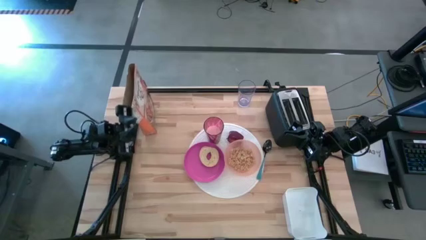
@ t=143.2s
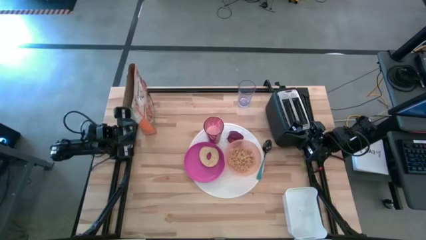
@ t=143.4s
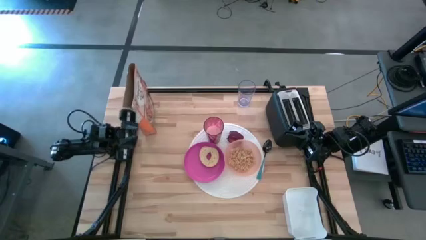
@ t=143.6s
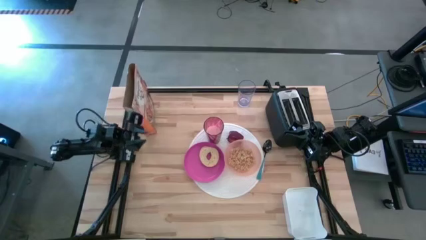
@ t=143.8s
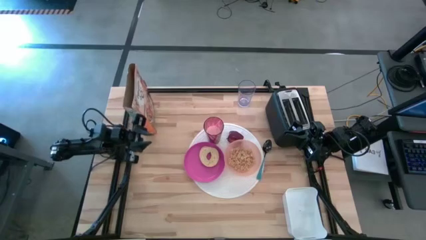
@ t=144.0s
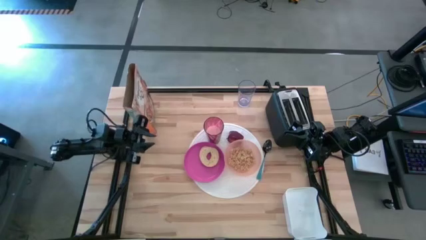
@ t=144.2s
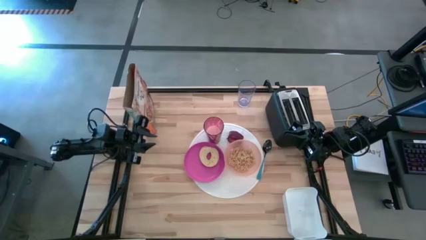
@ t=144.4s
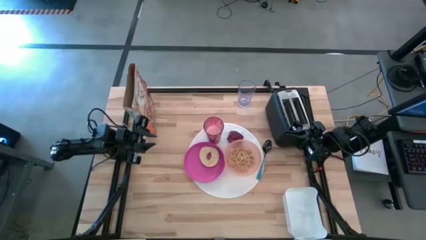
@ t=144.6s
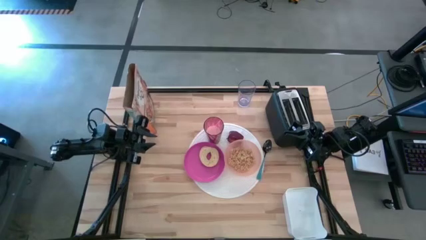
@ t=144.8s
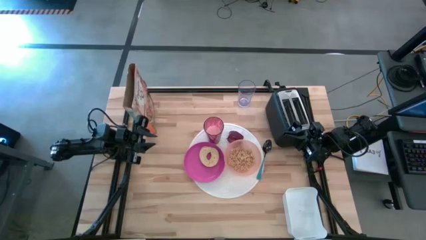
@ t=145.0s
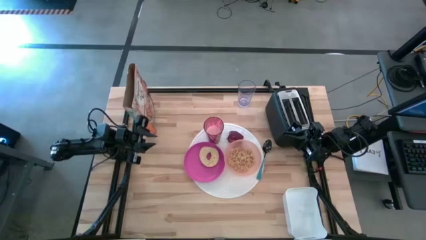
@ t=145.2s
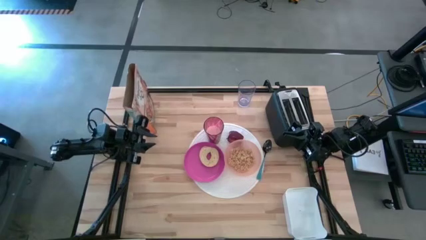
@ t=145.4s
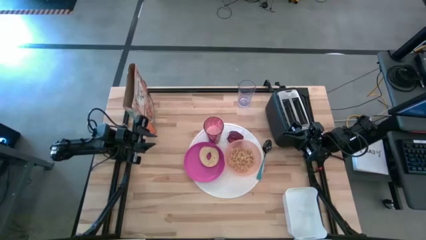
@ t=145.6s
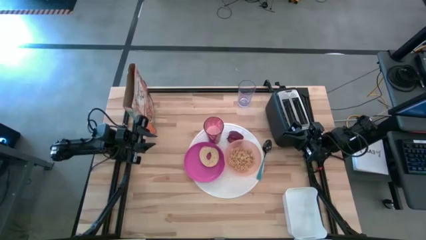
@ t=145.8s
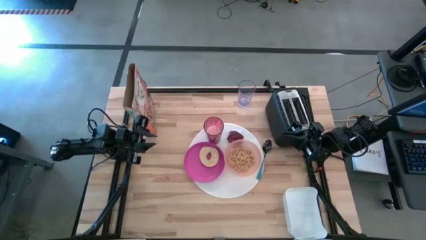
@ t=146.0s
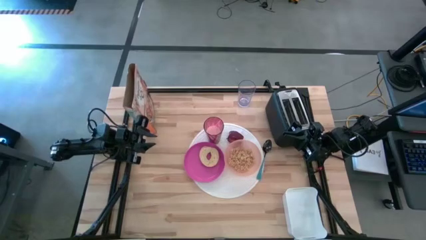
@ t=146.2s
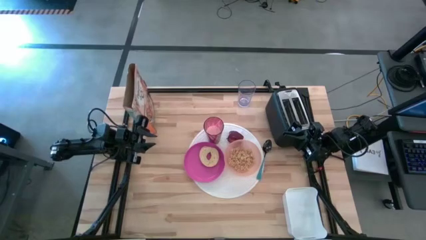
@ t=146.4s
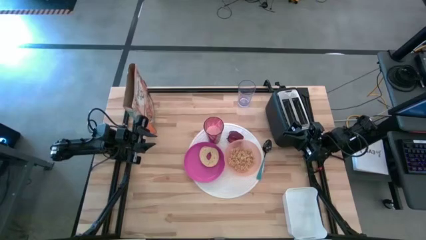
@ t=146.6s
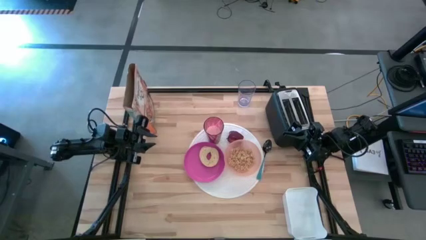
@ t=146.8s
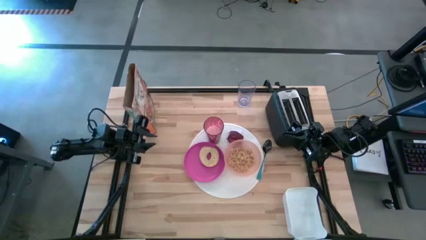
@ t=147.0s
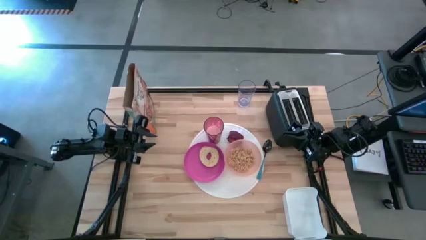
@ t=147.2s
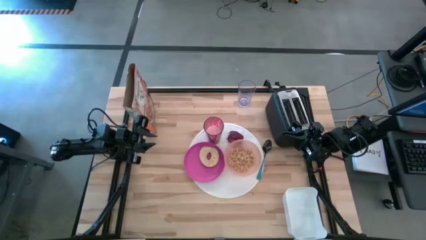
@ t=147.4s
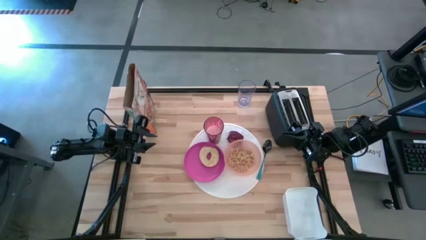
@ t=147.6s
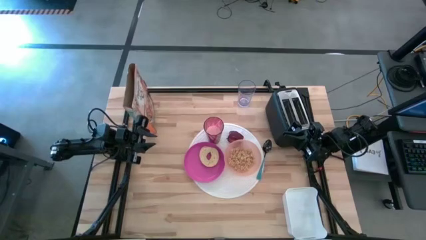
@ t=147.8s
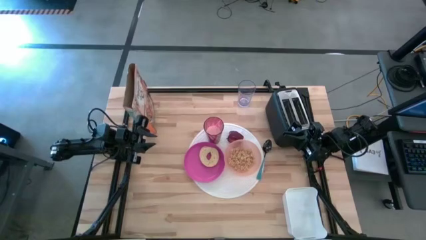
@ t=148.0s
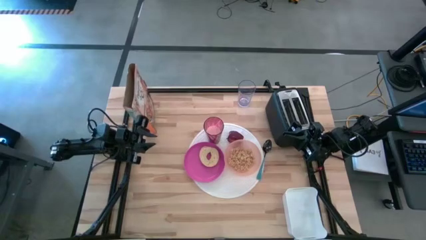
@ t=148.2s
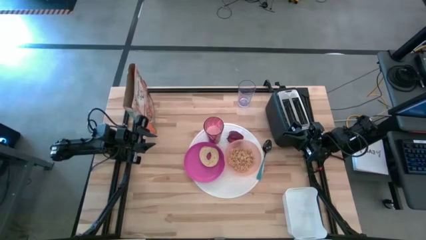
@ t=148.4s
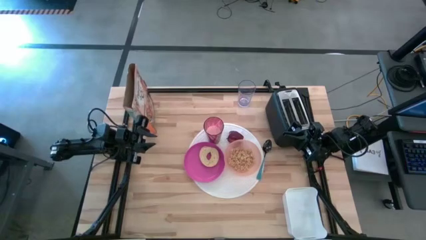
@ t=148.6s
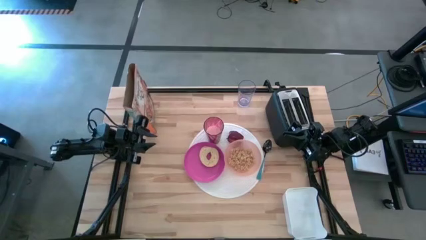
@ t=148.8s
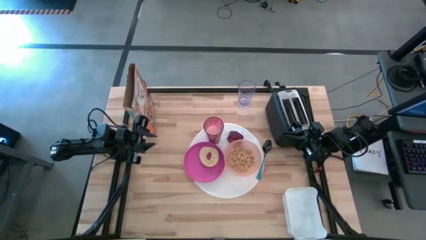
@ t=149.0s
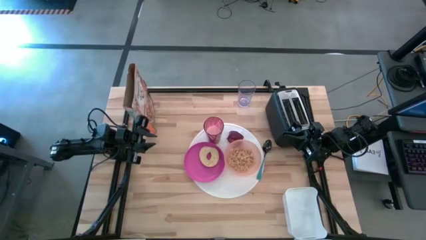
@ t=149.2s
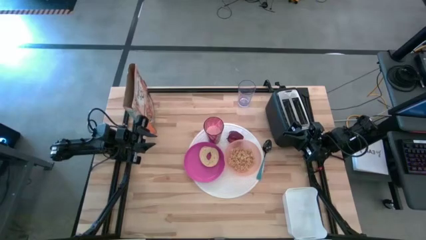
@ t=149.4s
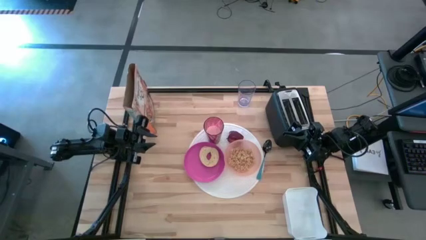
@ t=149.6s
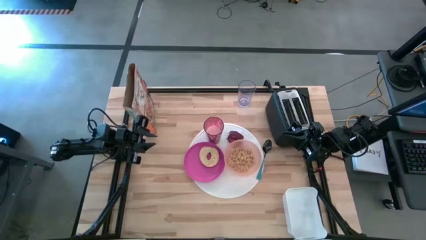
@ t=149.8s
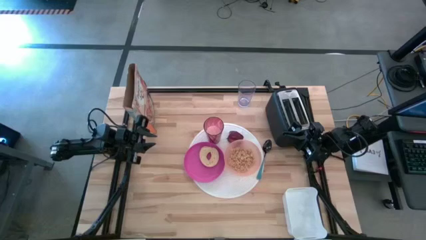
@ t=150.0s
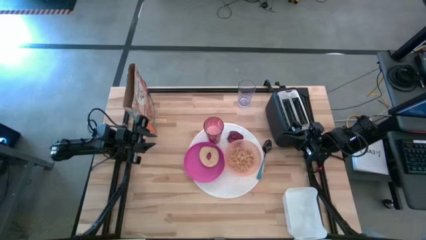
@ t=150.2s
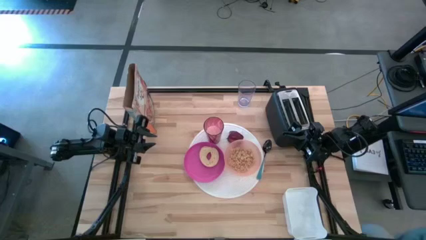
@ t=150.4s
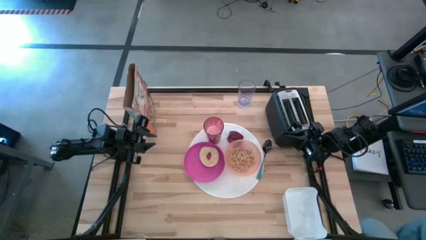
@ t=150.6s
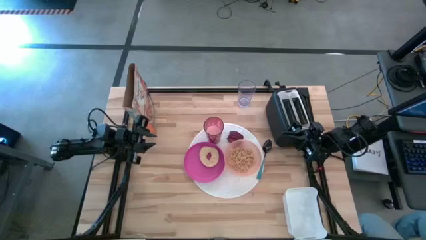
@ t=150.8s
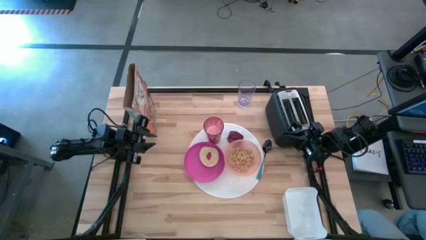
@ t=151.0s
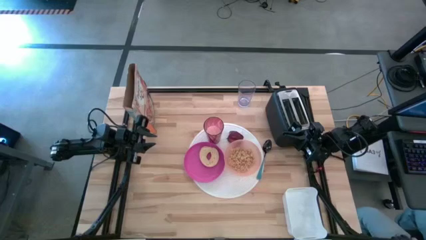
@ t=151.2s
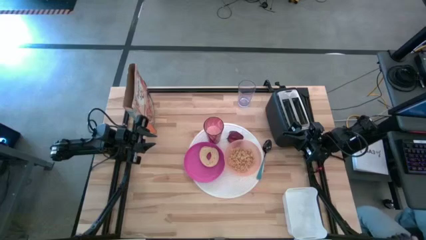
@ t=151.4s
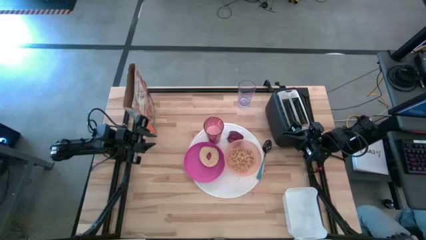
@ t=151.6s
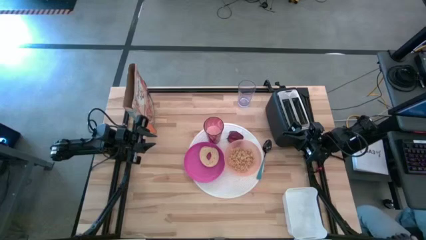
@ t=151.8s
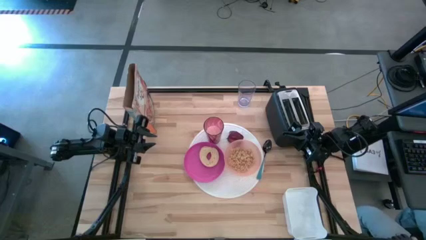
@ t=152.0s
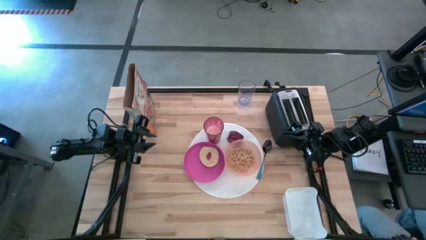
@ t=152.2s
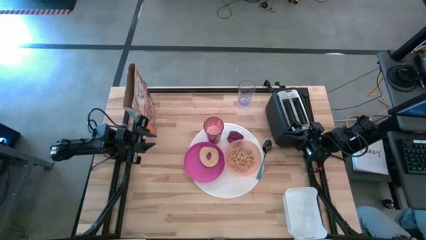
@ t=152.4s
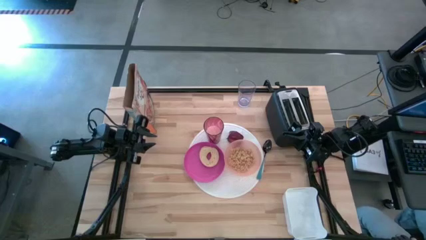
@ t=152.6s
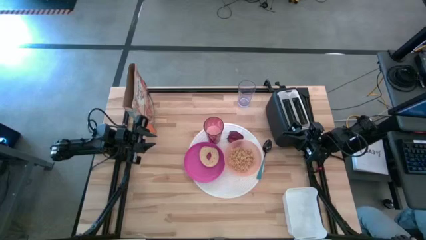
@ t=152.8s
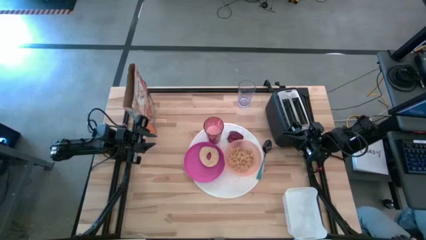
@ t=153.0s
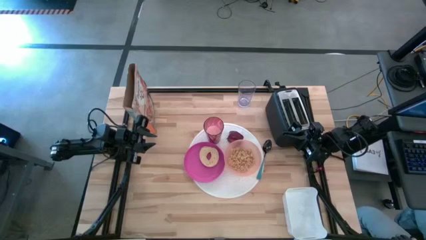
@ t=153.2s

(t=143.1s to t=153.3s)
Task: Arrange a breakfast setting
Return to Home Position
